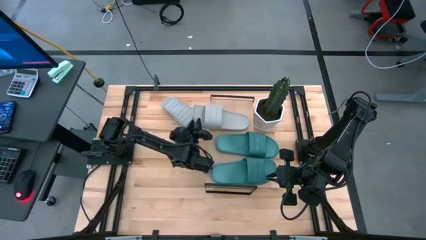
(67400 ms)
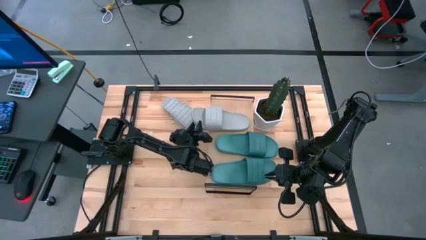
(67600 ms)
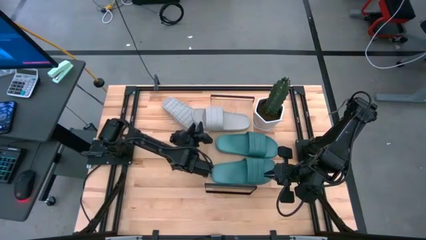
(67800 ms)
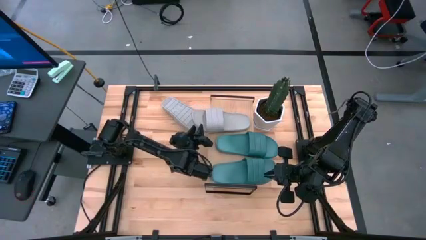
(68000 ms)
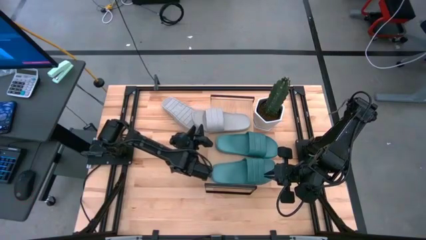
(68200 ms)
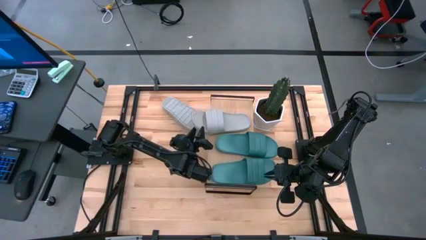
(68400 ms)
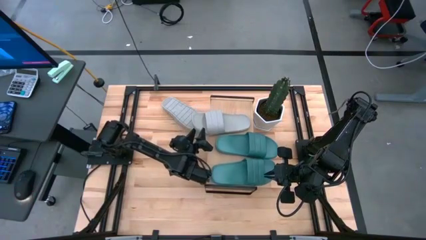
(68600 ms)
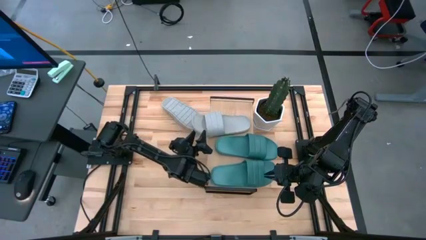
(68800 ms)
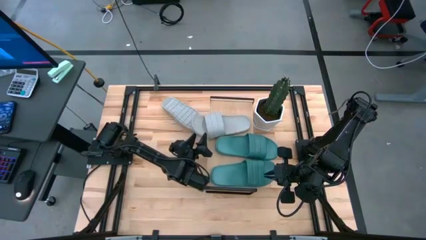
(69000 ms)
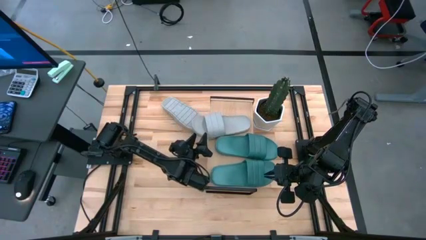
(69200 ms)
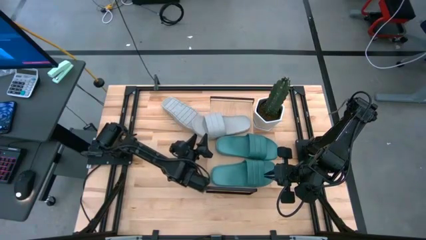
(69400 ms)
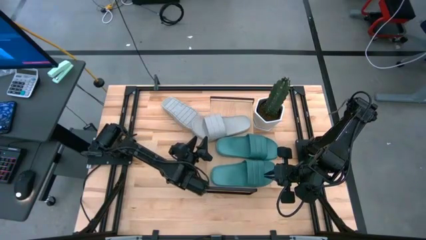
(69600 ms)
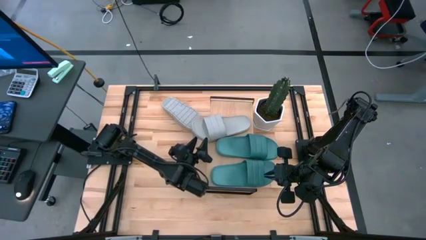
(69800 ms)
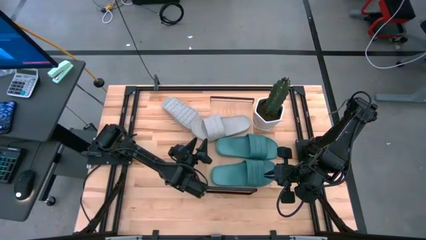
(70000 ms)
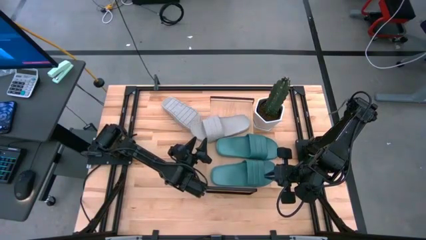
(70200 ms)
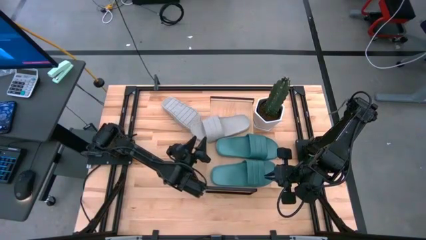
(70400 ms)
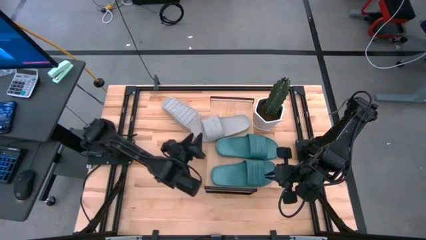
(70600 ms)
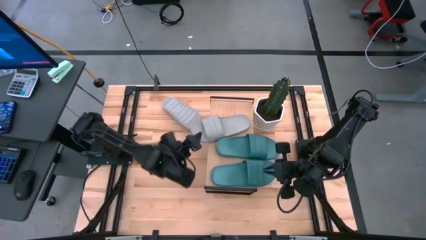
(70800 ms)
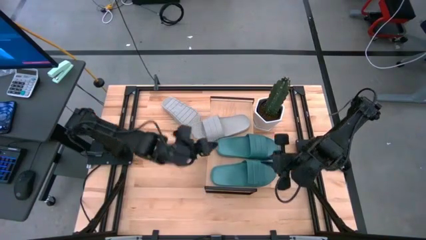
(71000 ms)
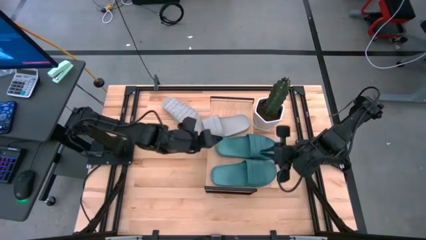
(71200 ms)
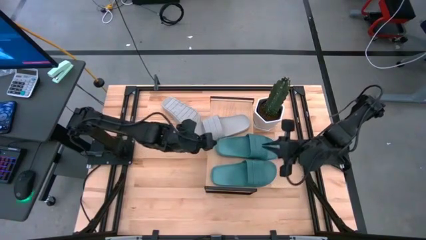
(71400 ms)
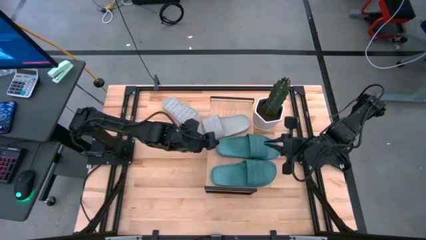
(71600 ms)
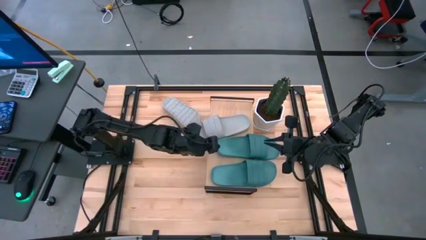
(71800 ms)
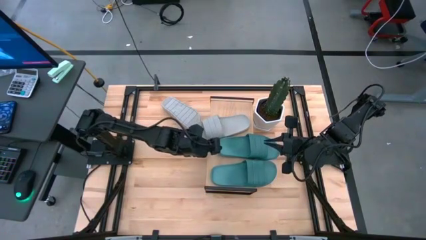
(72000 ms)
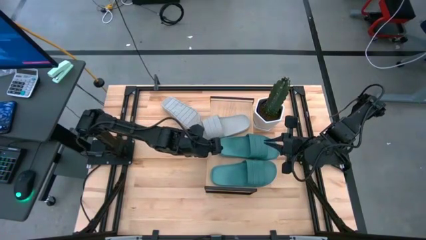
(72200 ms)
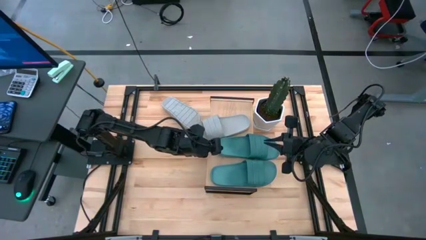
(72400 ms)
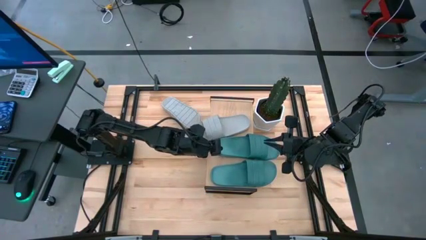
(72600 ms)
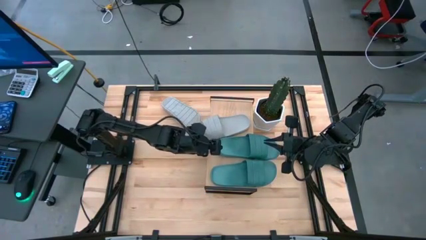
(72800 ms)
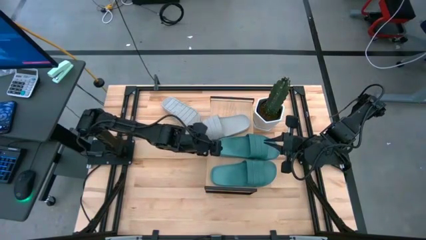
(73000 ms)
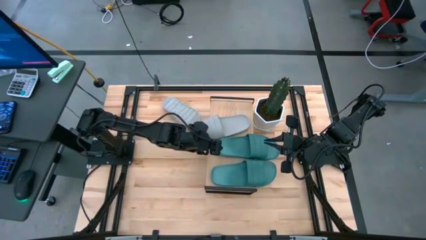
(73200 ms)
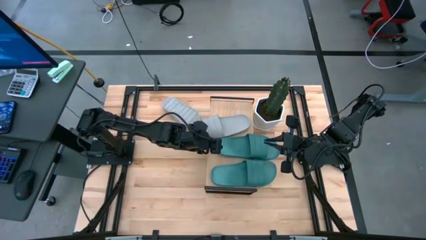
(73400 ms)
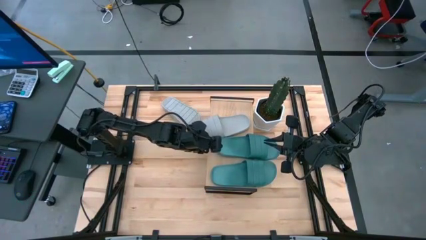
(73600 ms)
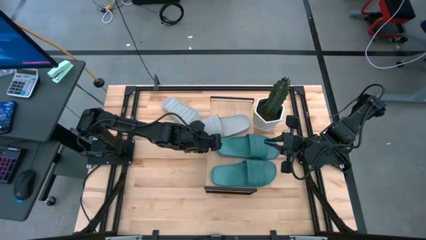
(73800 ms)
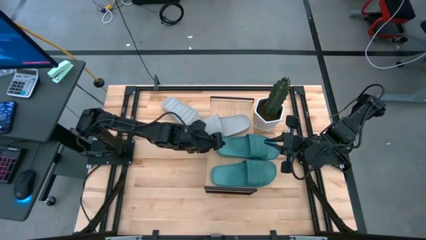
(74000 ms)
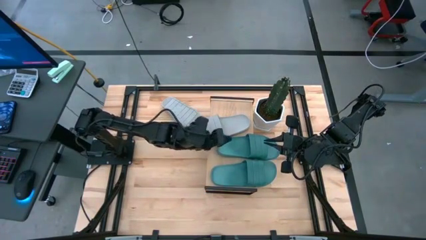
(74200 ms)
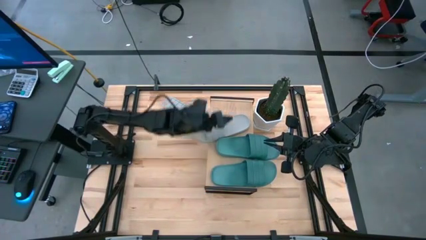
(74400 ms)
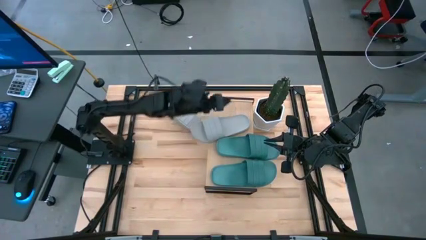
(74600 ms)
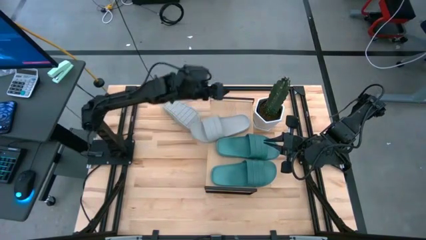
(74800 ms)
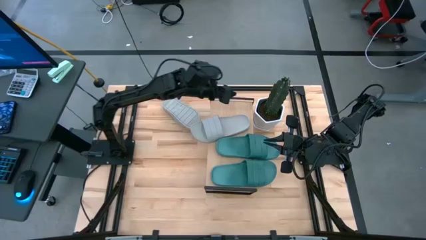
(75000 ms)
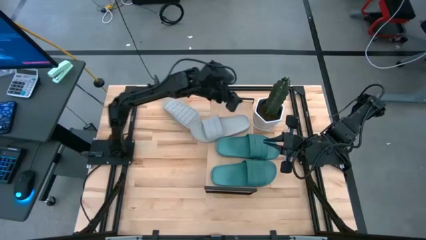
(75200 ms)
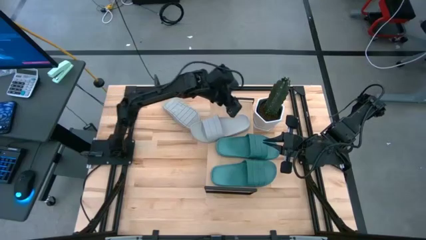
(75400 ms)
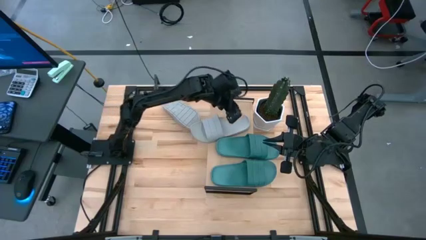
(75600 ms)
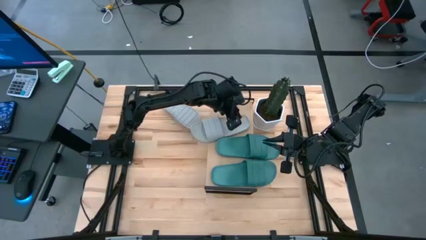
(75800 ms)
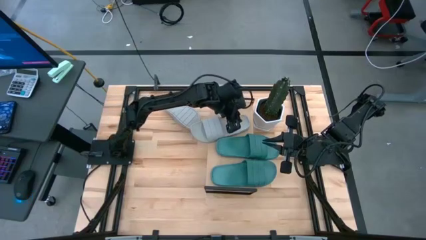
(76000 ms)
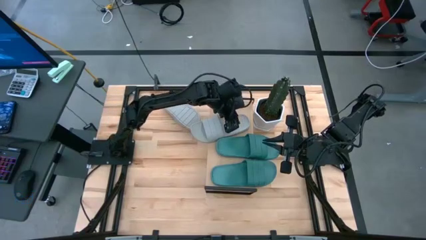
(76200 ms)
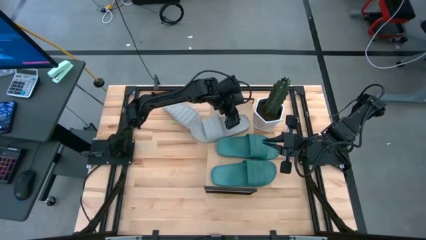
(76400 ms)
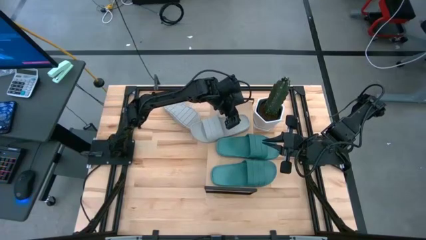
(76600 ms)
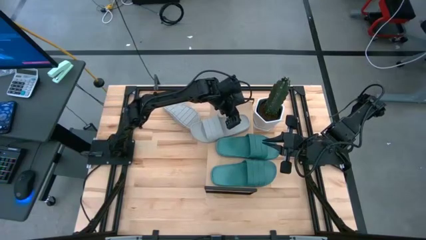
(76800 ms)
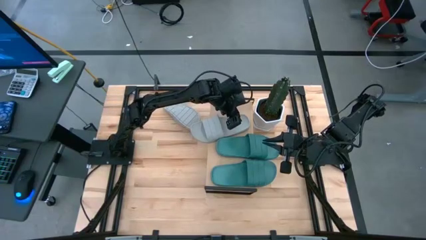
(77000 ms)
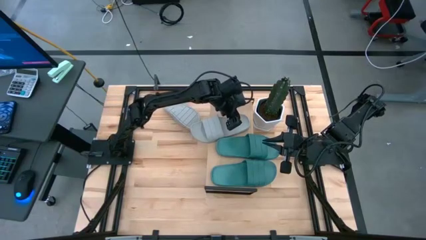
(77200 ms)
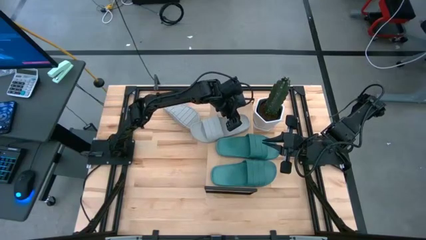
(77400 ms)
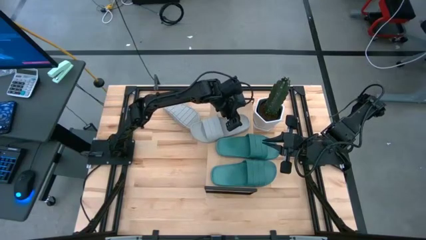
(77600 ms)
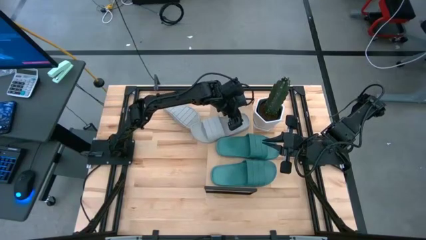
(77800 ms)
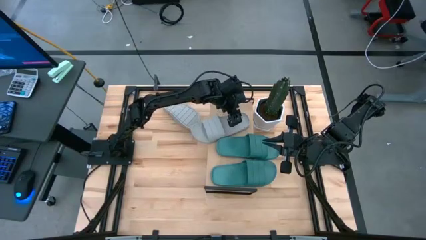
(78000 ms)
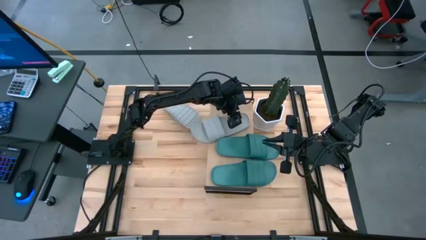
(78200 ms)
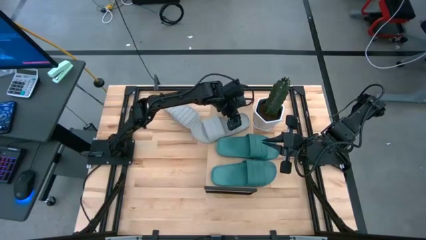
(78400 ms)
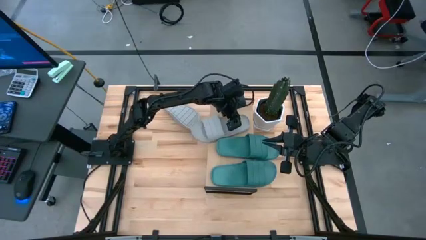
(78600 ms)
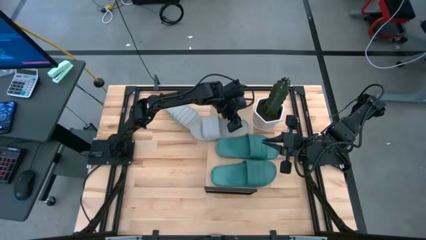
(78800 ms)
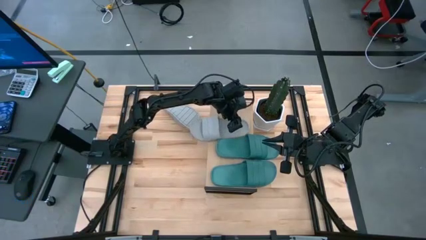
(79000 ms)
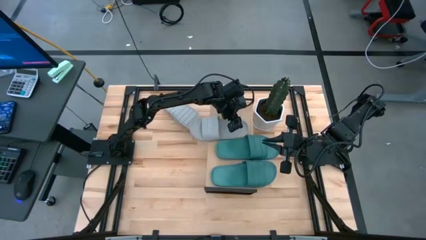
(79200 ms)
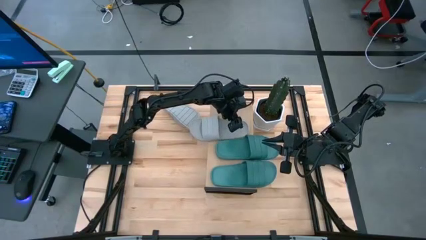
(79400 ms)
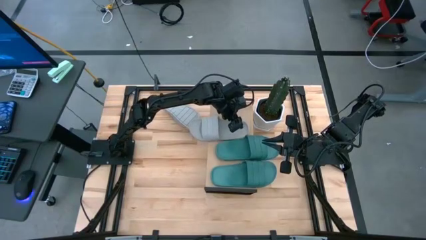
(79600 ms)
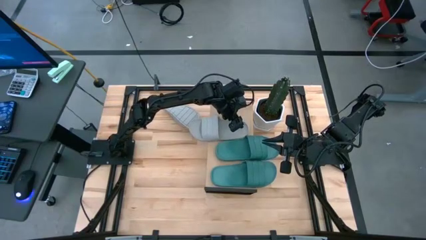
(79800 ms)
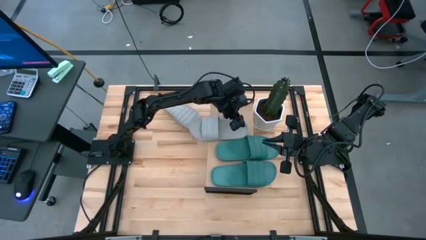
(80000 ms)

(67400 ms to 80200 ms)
Task: Pick and place slides into the shelf
Put the bottom gray slide on the shelf
